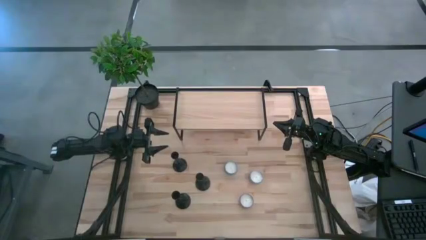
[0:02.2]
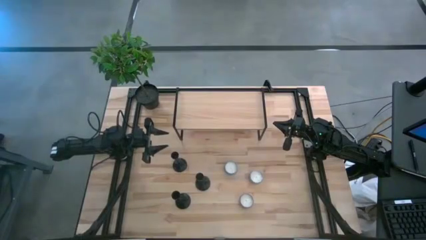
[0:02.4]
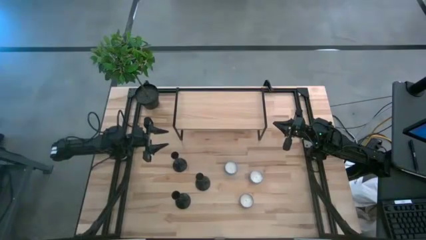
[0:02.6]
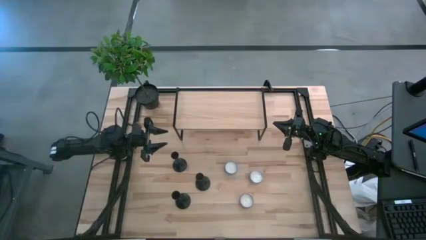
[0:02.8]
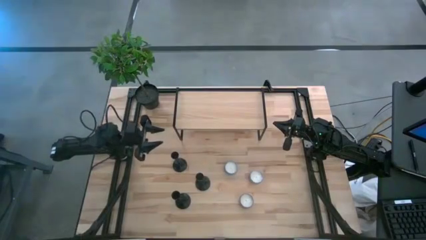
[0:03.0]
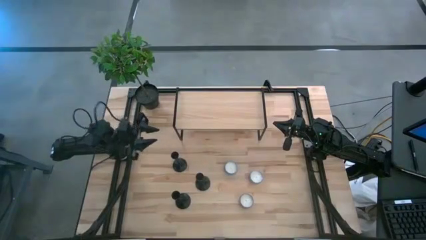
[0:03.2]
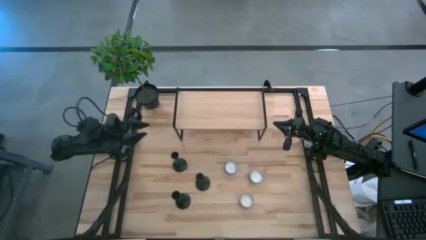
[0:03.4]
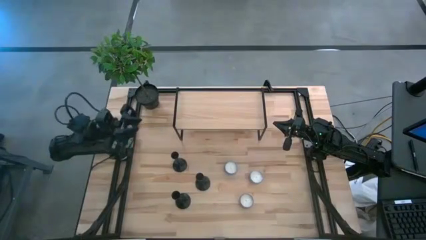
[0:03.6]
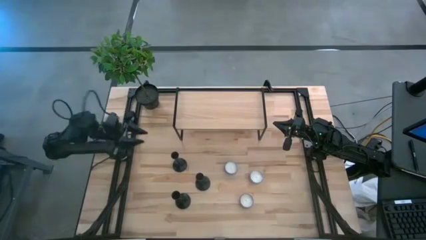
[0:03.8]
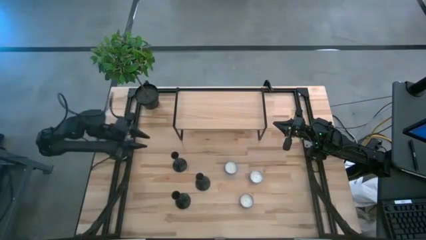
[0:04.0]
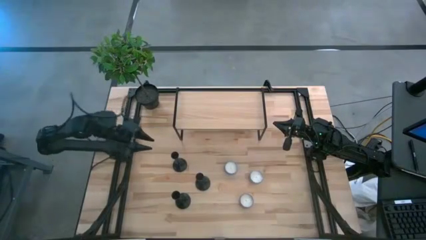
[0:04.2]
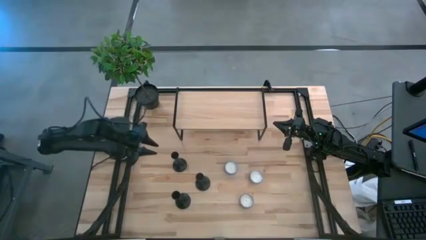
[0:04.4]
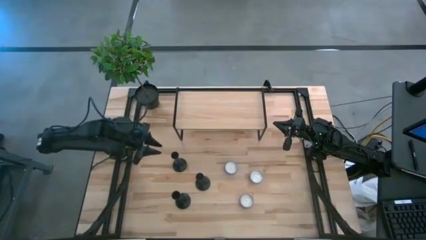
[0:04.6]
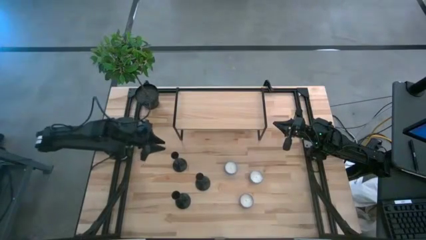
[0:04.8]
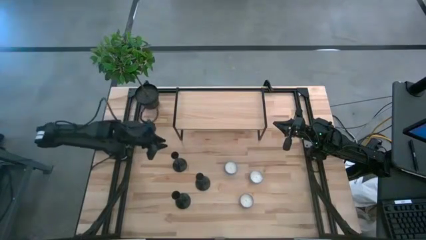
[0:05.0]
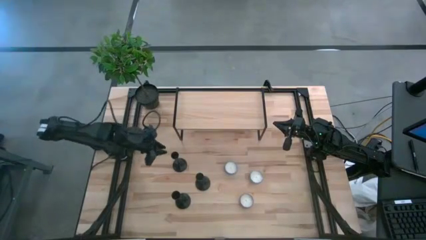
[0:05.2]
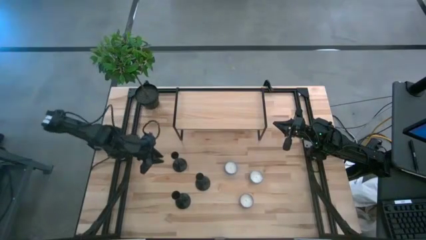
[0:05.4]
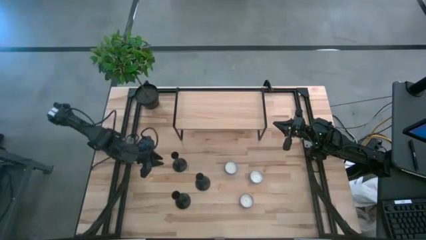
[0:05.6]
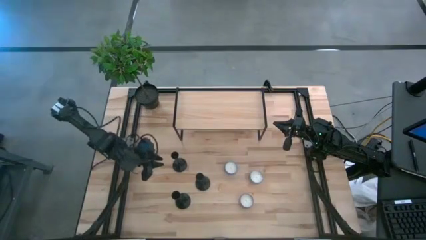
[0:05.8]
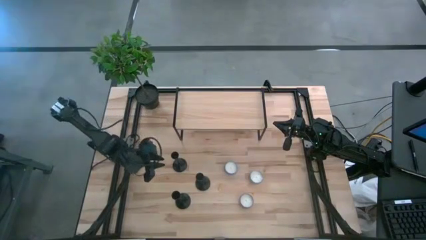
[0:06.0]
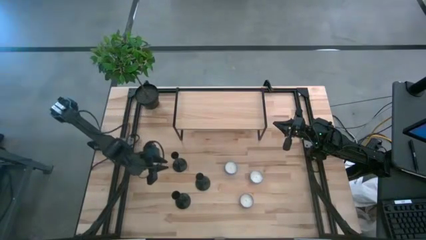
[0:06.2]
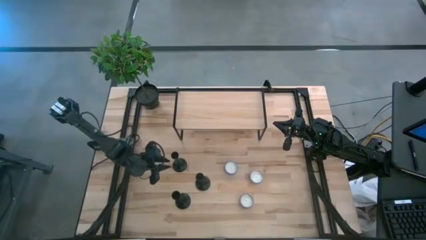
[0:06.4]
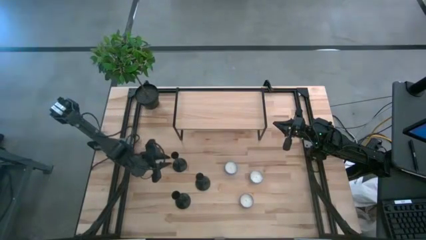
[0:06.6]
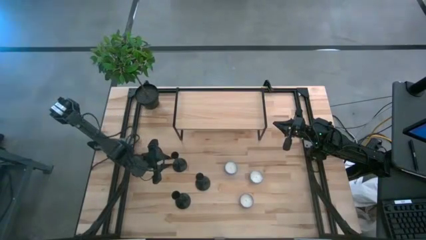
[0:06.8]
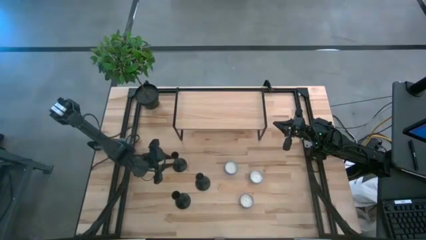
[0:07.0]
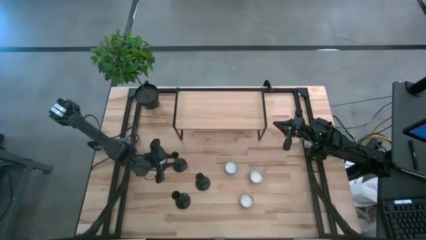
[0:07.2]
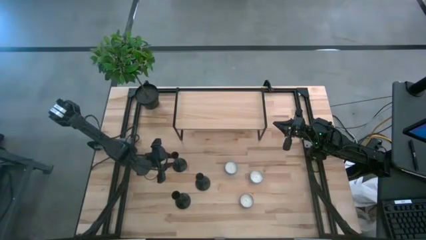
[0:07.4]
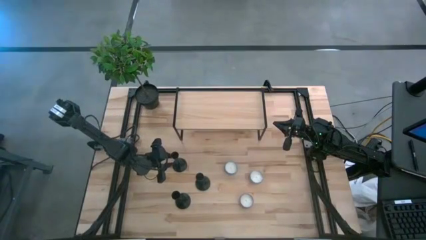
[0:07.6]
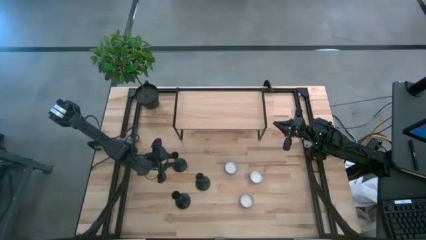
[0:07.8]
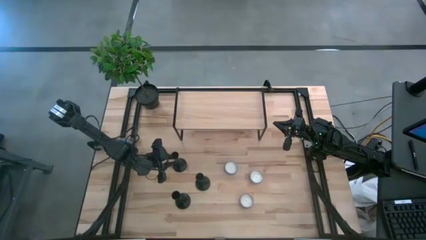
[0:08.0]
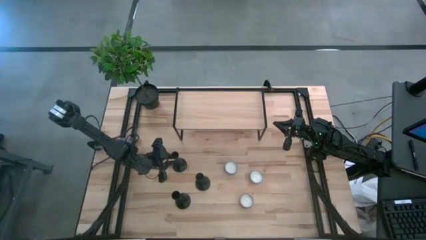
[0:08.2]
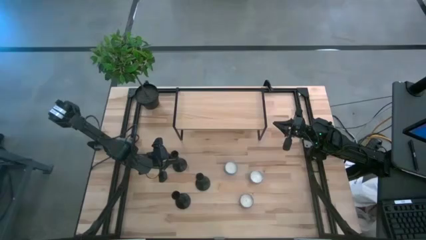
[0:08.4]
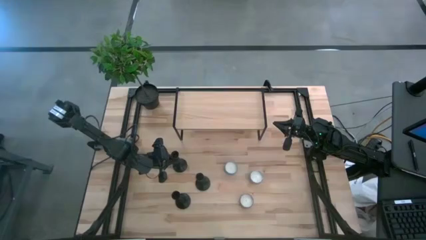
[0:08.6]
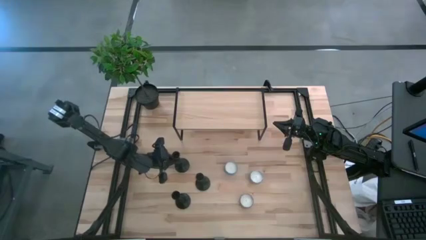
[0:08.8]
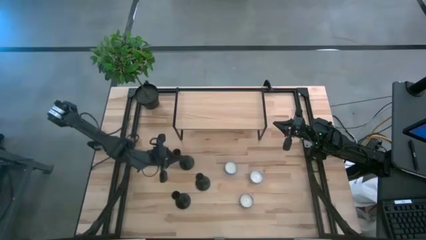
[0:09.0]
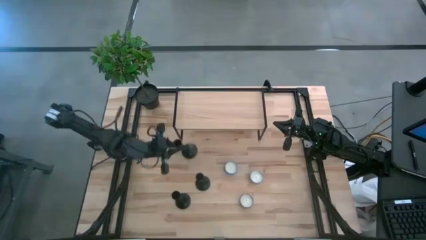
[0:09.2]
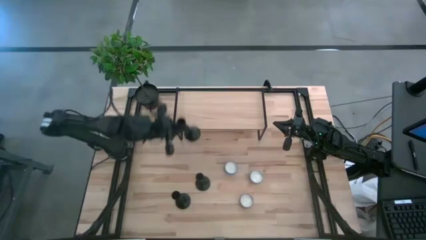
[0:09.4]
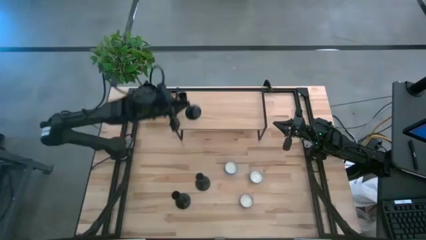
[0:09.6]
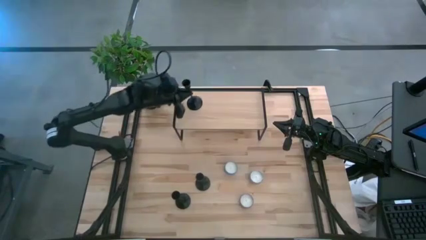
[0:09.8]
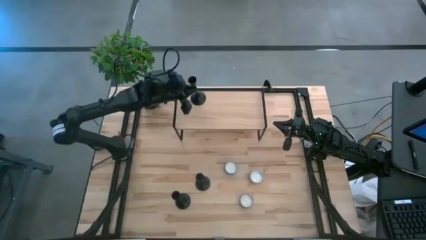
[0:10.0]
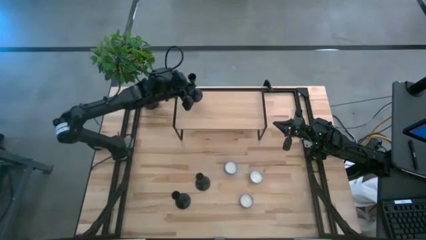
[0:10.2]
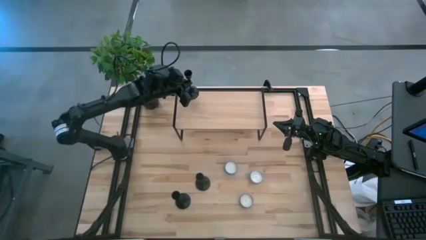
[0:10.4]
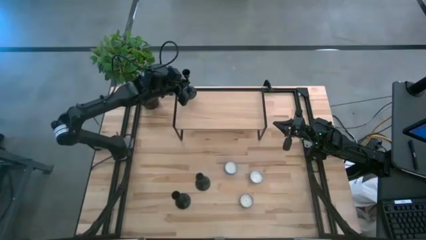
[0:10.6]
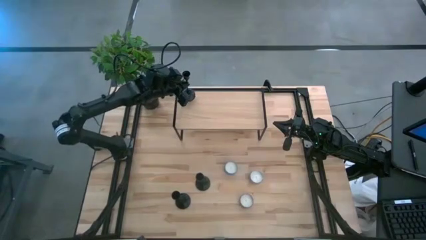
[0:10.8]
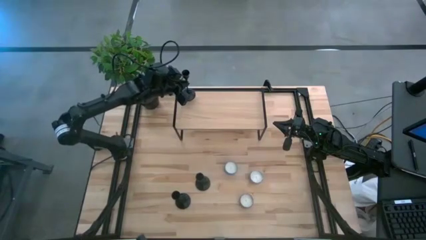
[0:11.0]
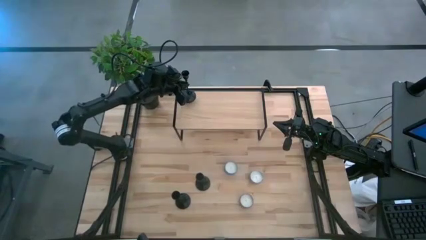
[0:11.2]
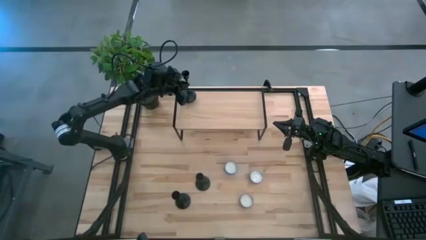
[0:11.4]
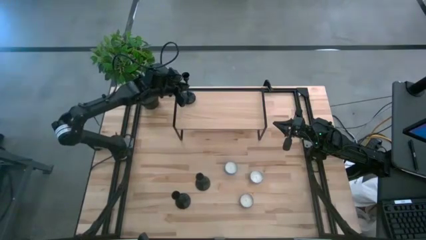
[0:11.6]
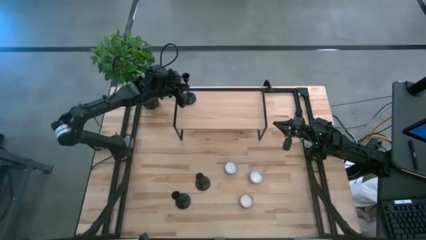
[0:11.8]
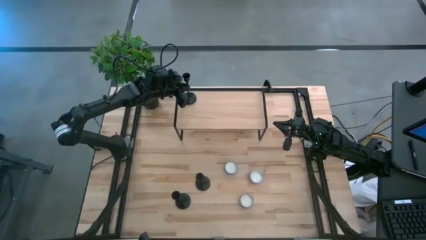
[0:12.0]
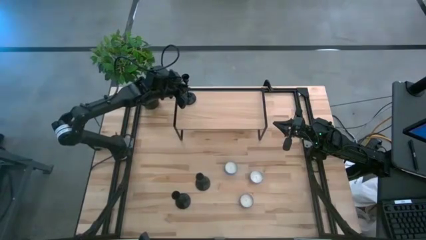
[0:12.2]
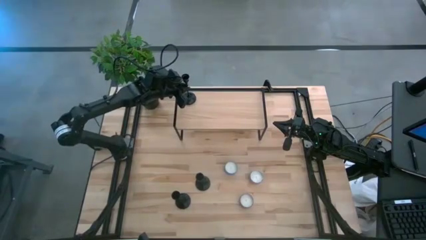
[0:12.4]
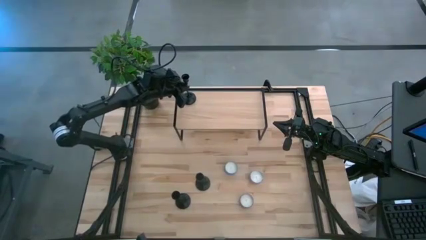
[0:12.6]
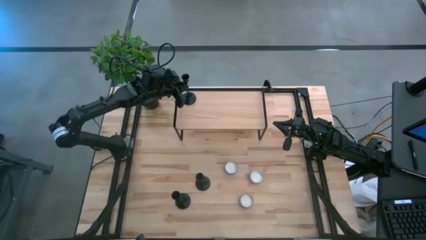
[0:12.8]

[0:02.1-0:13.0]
Task: Pick & Place candle stick holders
Put the top left black candle holder on the shelf
